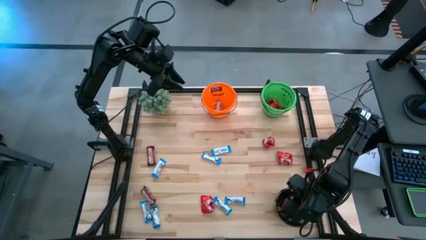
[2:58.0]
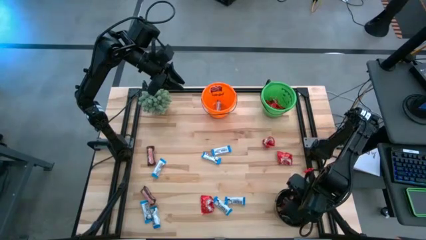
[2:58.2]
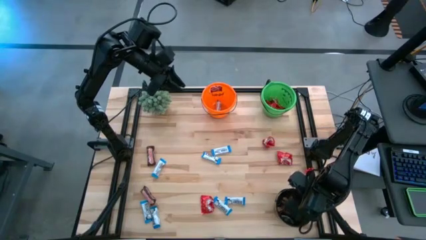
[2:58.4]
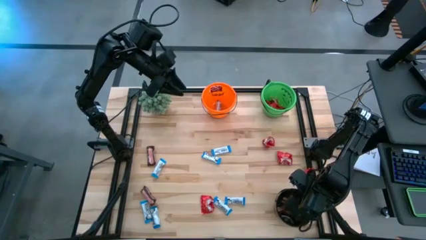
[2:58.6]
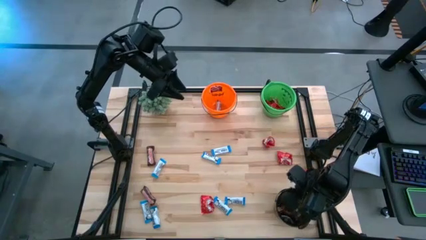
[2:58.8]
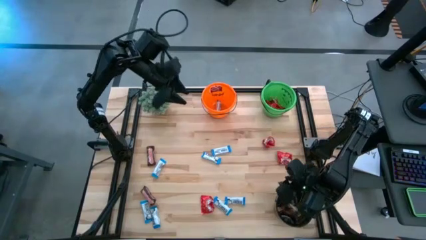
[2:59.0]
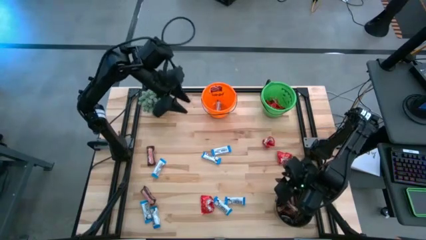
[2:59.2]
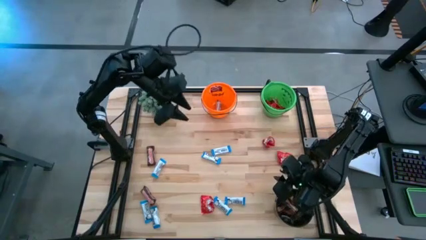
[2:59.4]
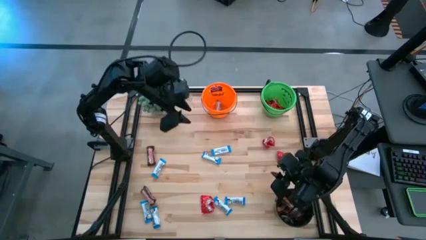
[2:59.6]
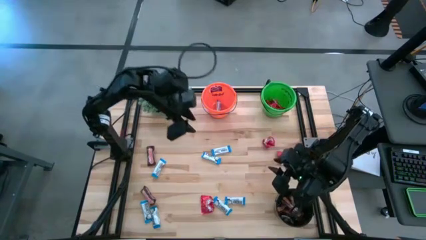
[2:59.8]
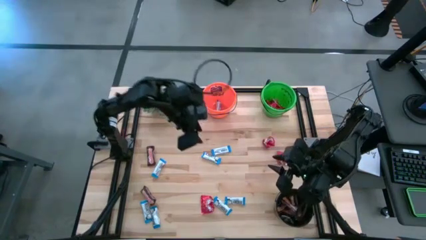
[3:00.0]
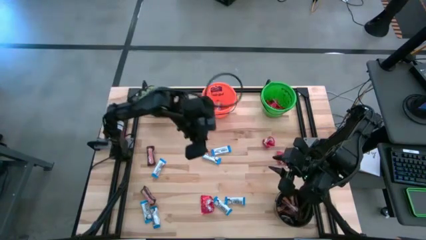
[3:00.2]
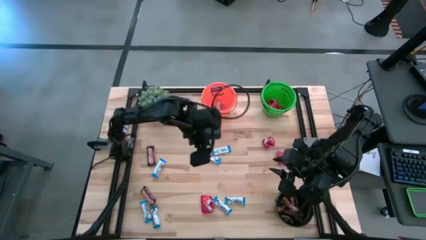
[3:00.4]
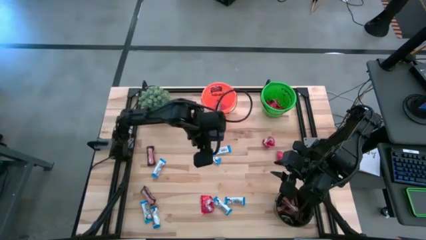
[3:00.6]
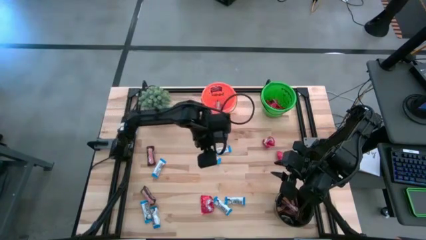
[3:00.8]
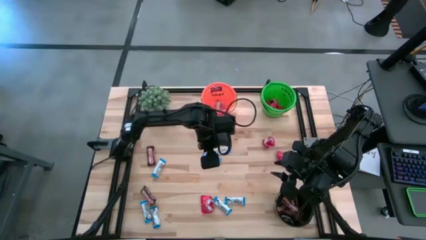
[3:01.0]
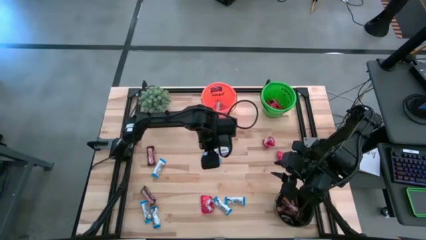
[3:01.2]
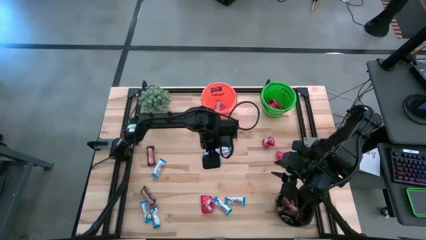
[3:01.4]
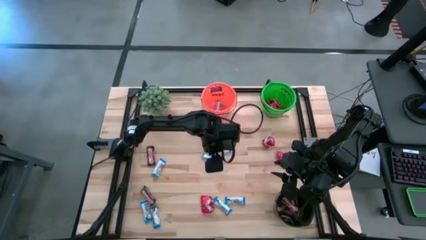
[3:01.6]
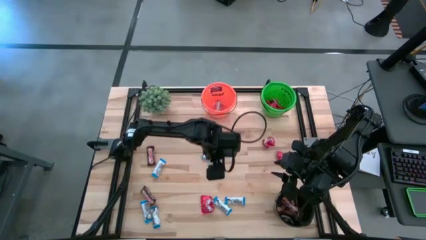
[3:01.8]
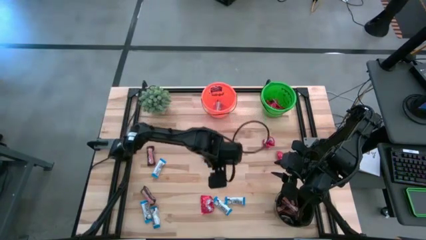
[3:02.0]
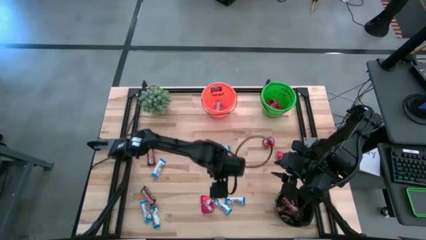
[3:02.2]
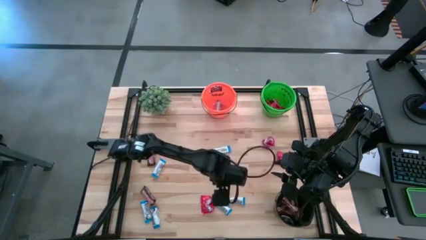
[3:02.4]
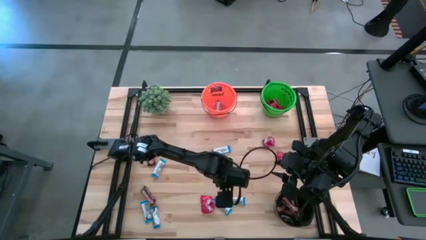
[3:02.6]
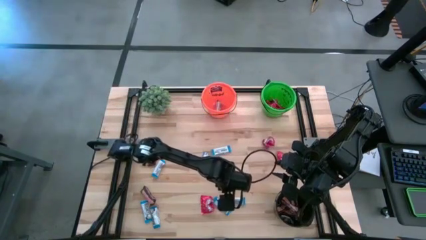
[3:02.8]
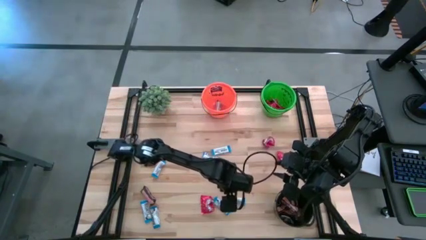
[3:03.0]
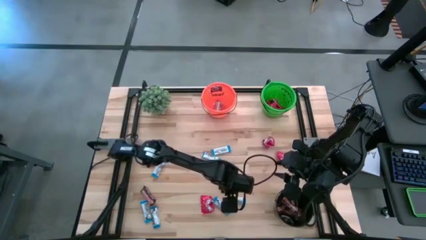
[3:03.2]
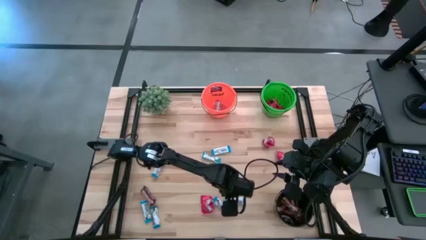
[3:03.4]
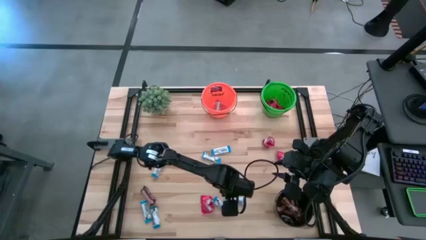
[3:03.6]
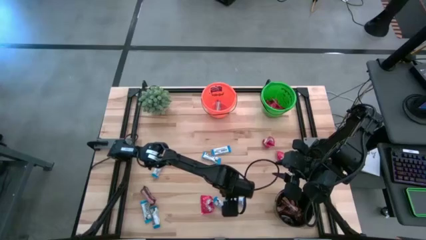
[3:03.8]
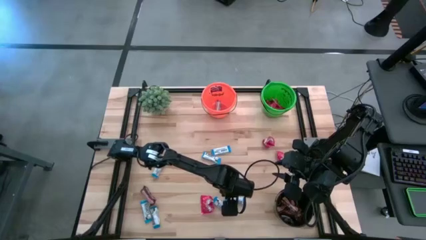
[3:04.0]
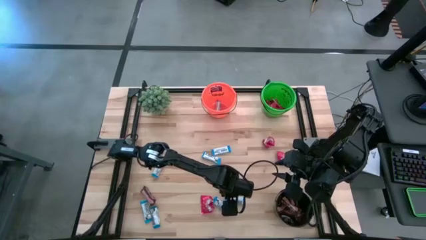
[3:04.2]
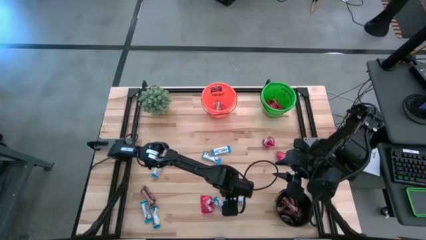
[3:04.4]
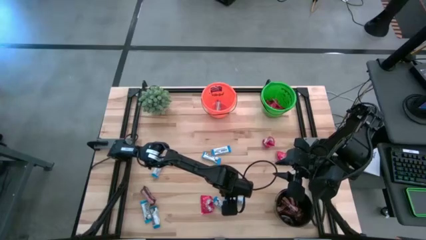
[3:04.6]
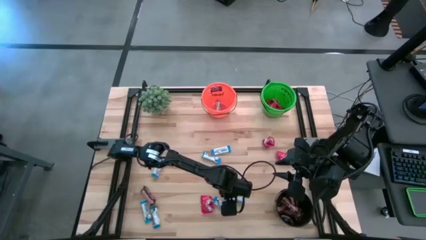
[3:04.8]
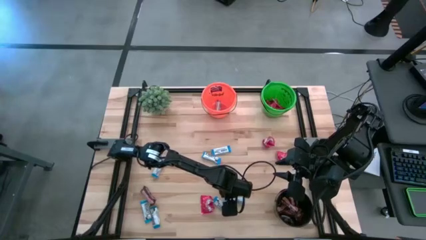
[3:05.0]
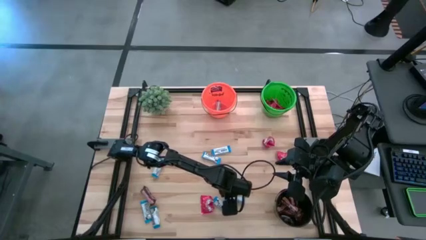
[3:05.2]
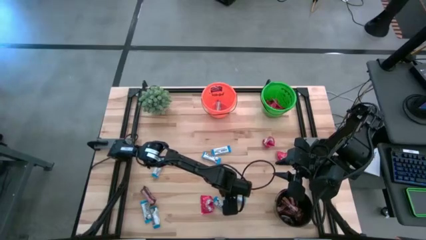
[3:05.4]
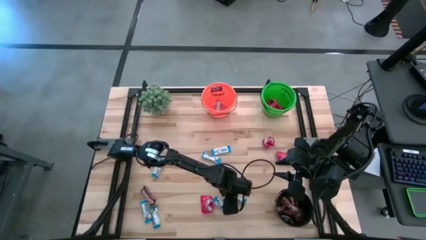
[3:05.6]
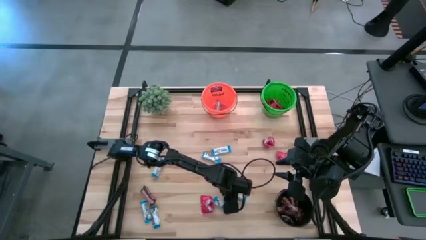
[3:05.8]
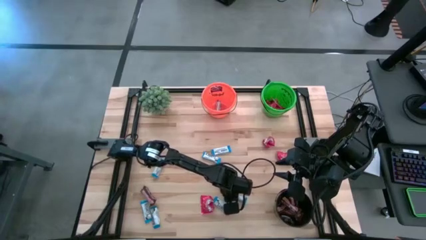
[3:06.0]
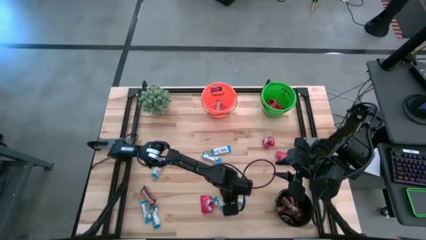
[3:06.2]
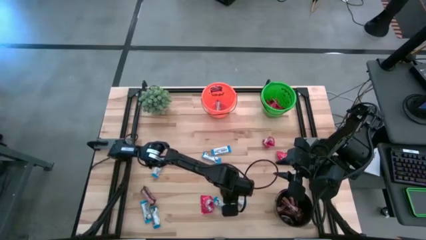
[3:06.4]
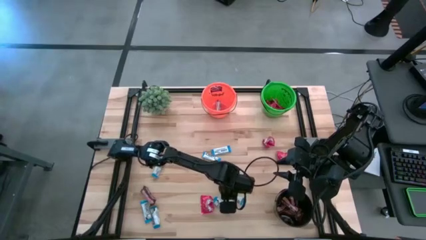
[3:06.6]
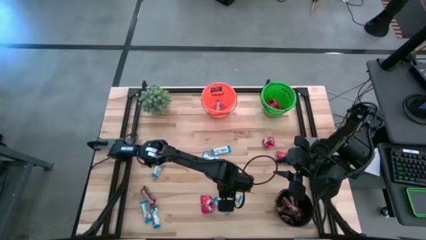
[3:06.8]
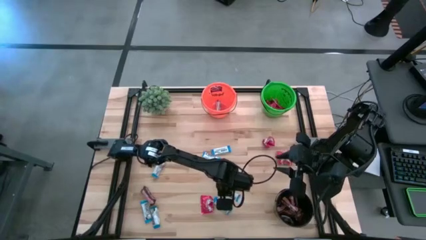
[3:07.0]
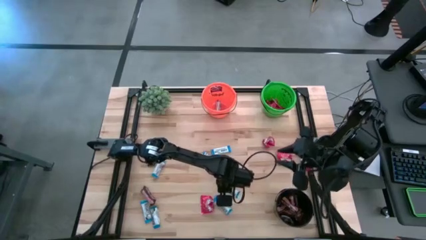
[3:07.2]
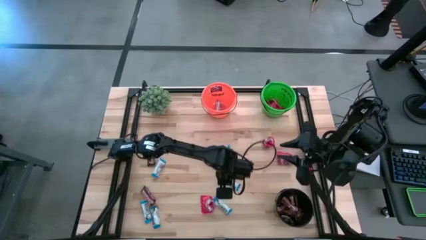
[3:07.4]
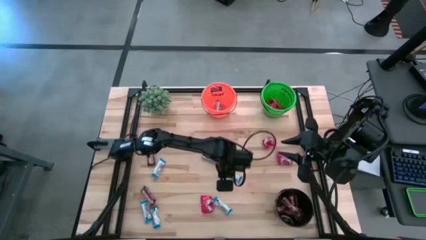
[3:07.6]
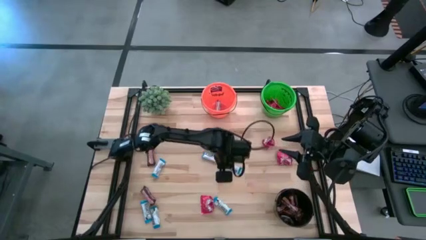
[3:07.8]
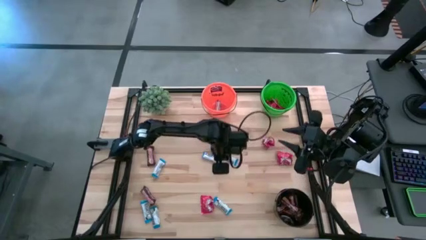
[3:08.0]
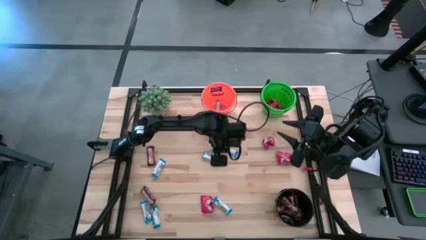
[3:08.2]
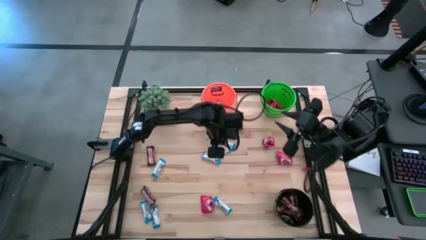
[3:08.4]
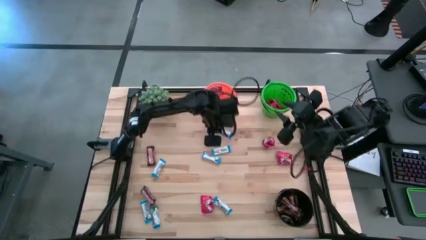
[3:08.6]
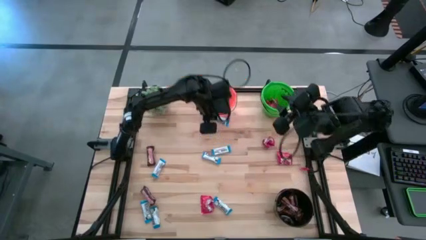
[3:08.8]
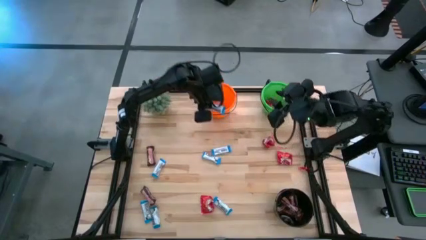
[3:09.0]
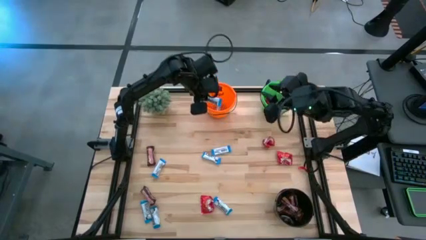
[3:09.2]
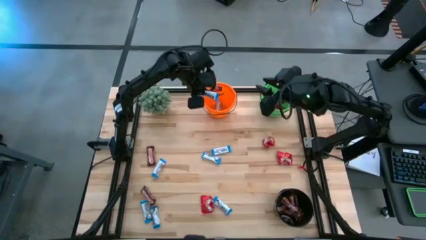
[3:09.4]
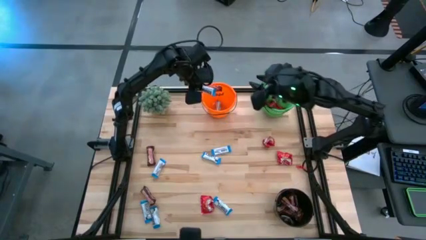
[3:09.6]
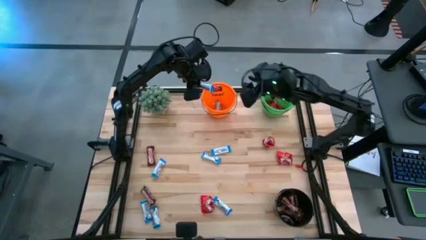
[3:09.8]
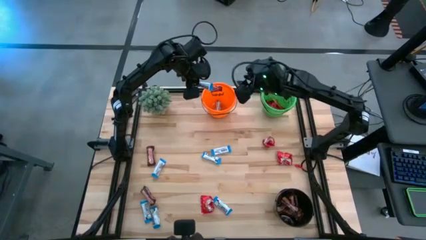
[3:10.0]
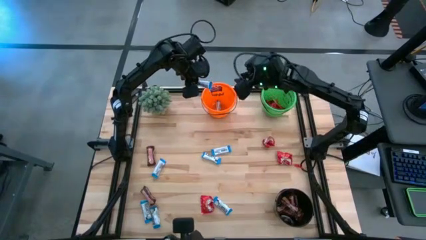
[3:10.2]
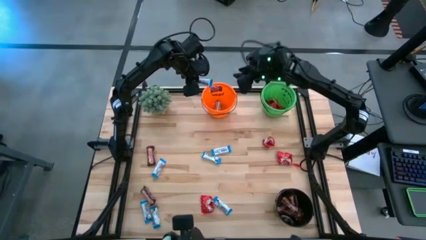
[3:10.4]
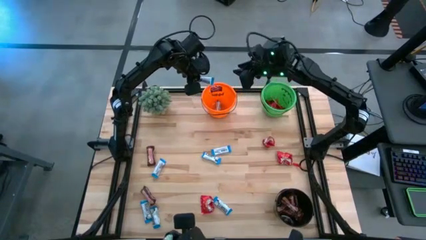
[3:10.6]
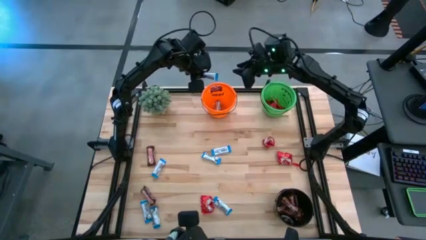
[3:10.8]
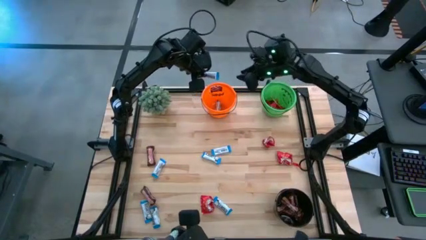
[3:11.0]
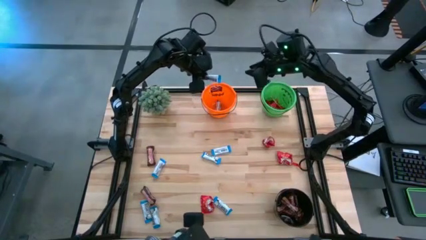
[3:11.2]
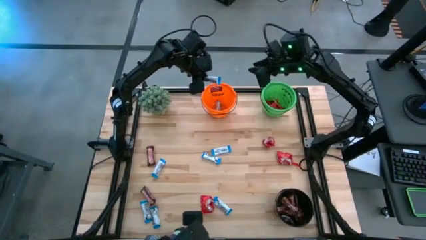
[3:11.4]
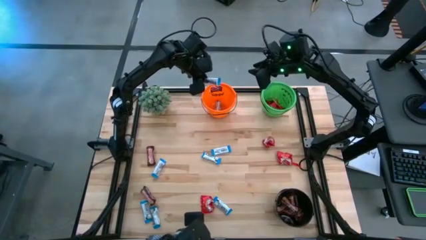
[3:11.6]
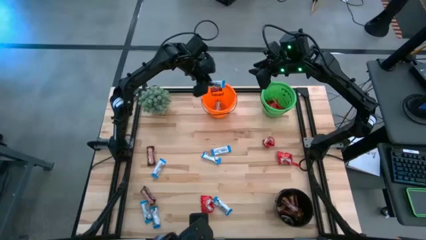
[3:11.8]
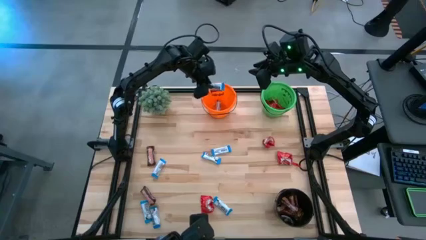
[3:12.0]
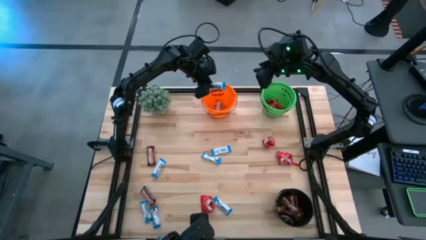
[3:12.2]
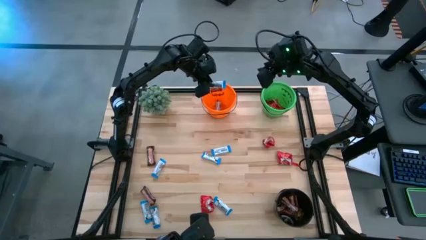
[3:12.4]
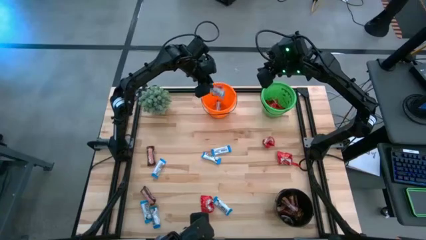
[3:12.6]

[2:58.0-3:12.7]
Task: Organize candy in baskets
Put the white chocolate bar into the orange bucket

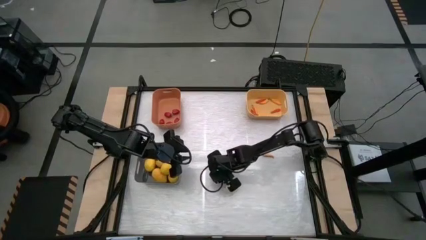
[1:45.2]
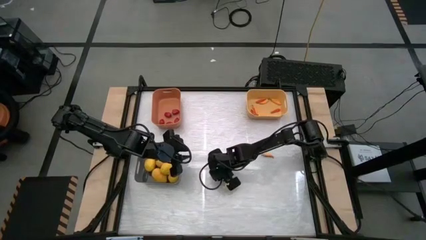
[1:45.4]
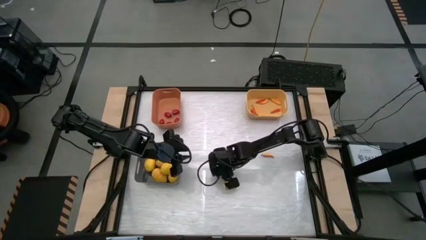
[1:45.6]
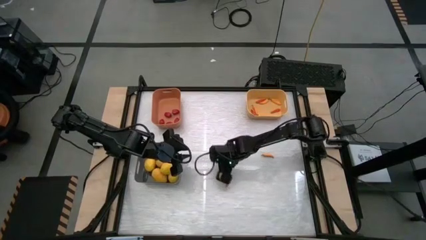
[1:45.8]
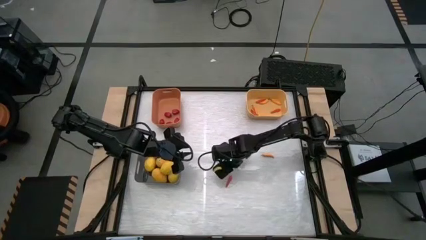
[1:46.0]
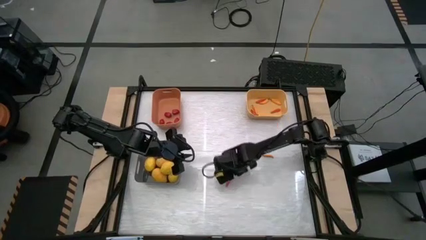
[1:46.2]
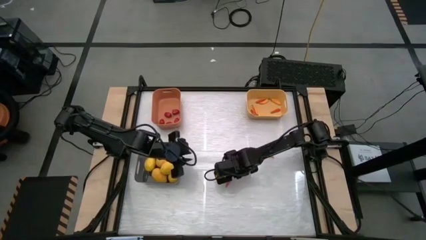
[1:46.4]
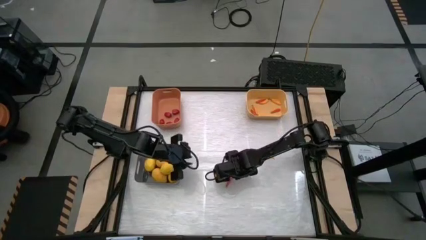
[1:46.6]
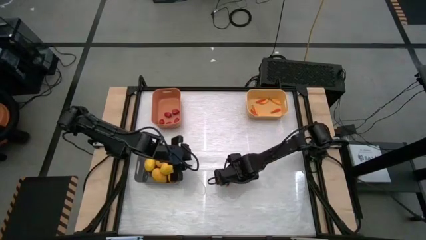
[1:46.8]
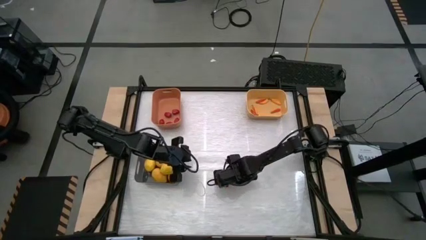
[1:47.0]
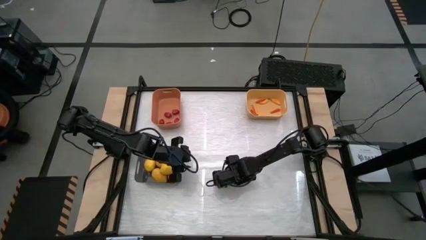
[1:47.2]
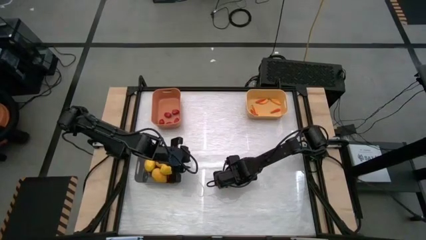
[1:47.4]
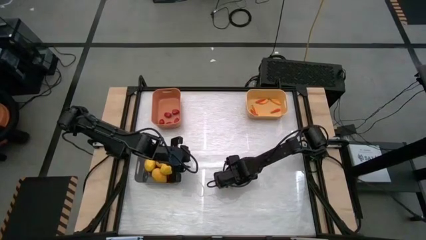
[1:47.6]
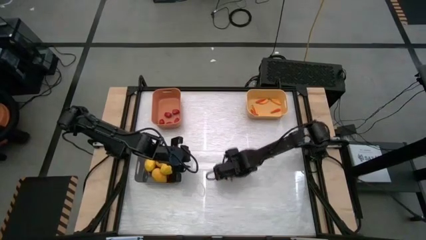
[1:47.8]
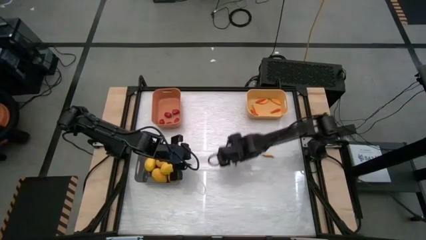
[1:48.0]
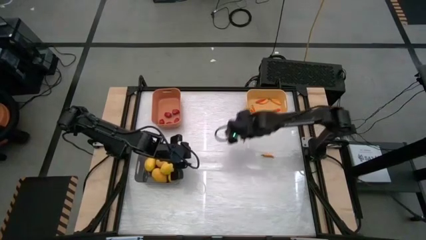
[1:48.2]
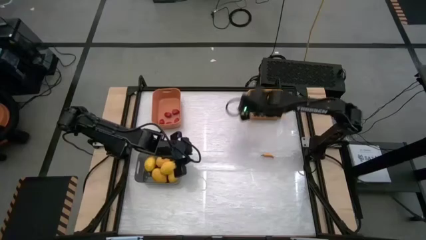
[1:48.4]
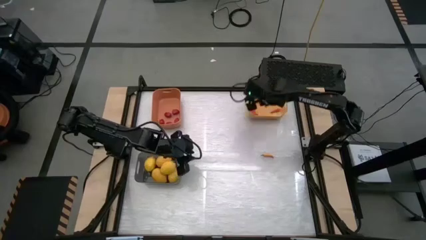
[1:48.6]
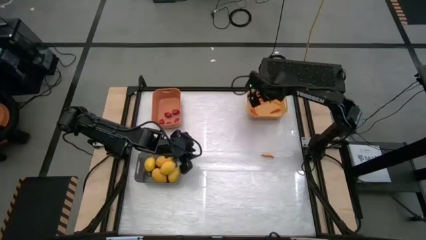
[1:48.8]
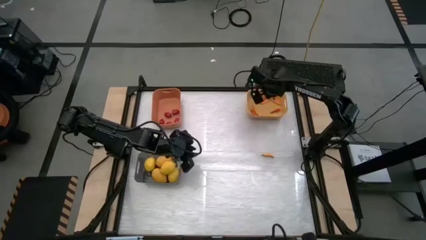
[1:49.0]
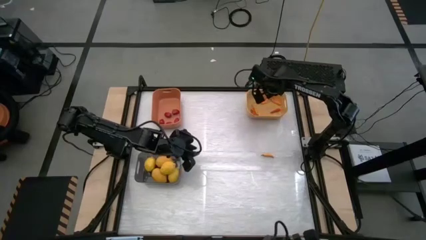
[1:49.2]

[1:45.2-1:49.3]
Task: Sort produce into baskets
Put the orange chili pepper into the yellow bin
